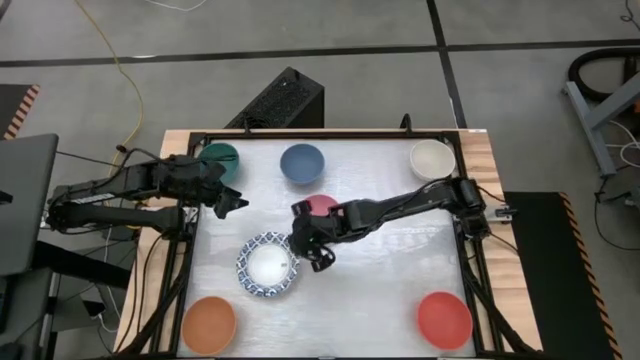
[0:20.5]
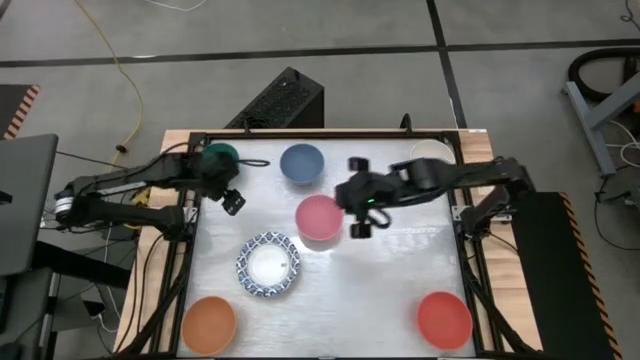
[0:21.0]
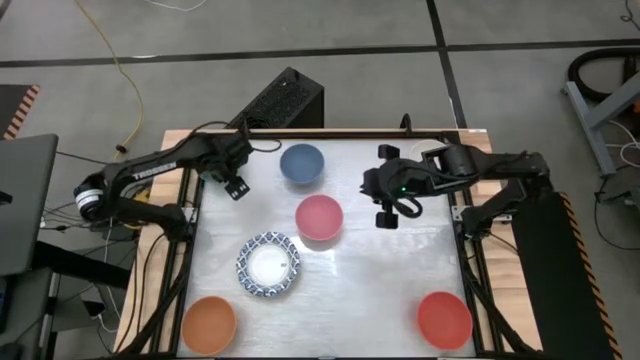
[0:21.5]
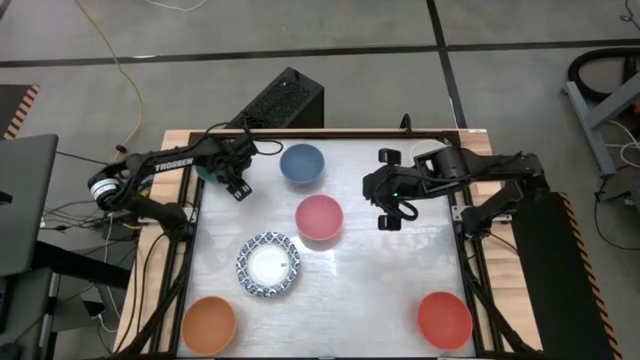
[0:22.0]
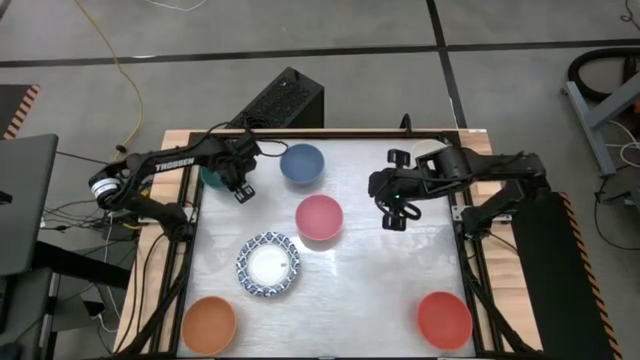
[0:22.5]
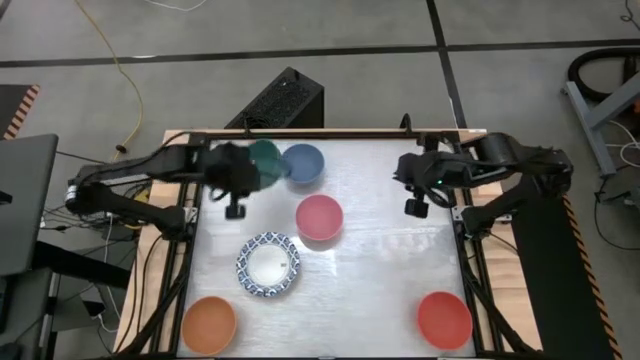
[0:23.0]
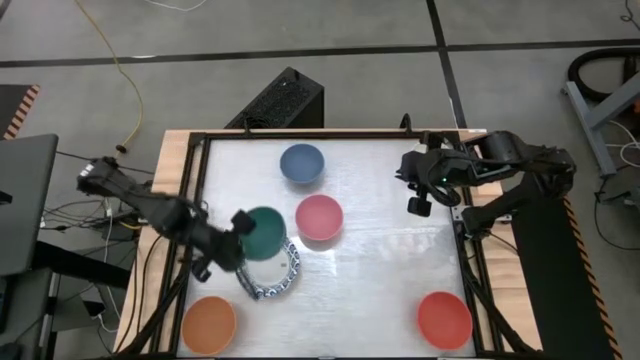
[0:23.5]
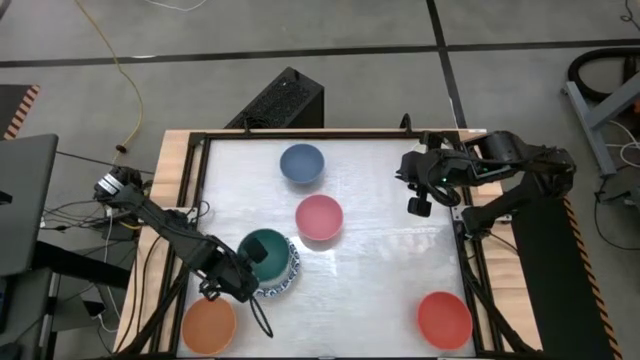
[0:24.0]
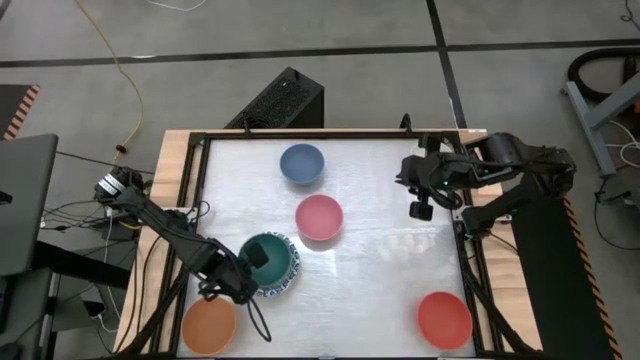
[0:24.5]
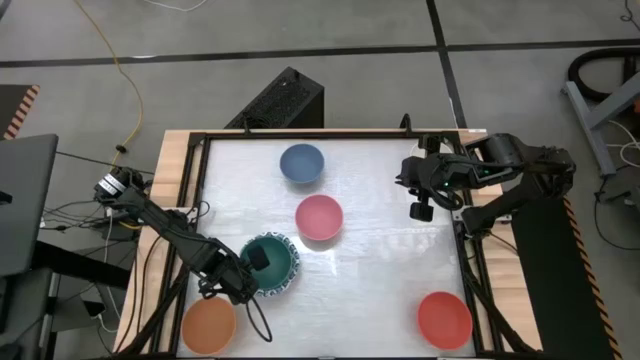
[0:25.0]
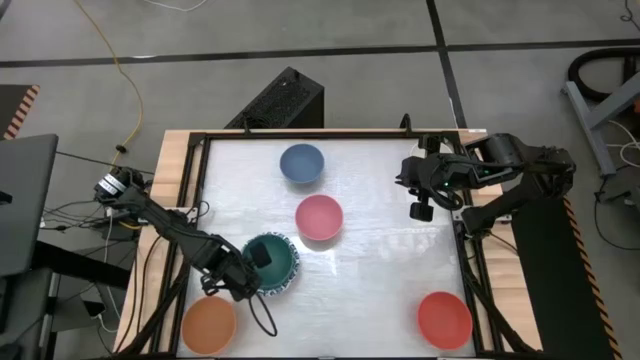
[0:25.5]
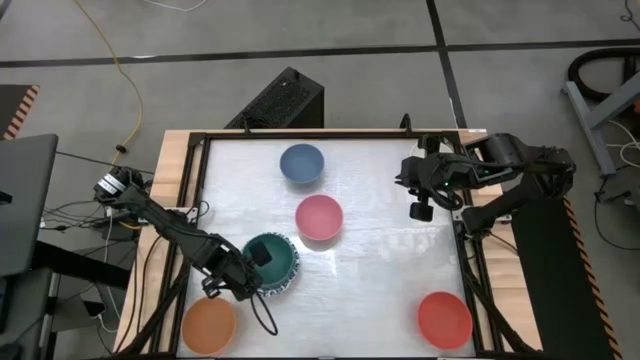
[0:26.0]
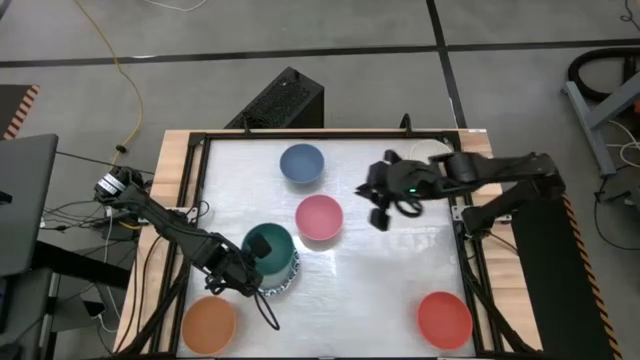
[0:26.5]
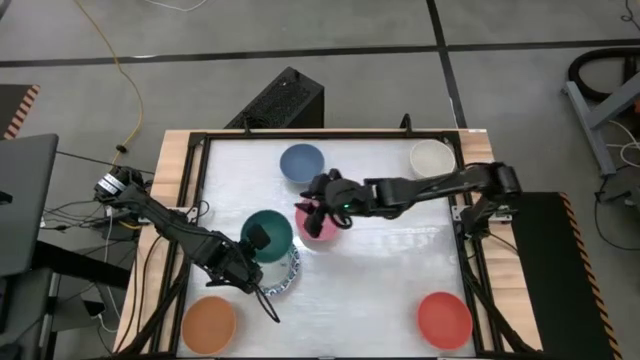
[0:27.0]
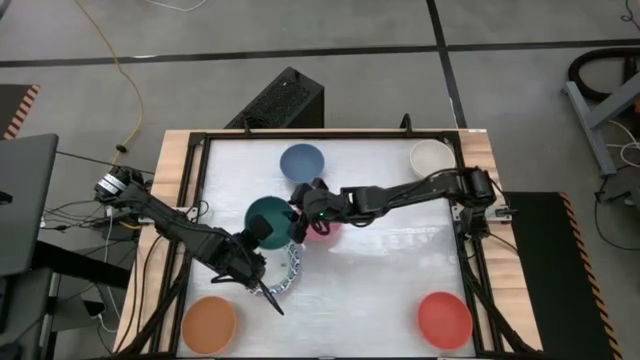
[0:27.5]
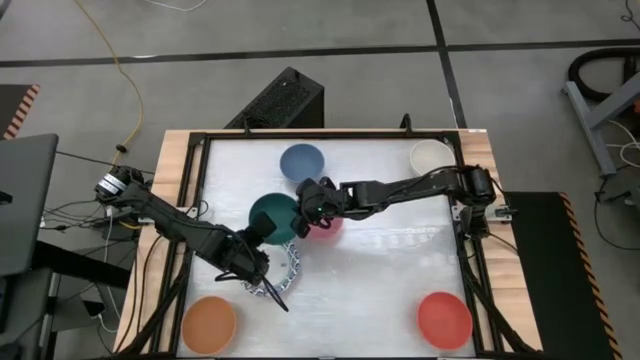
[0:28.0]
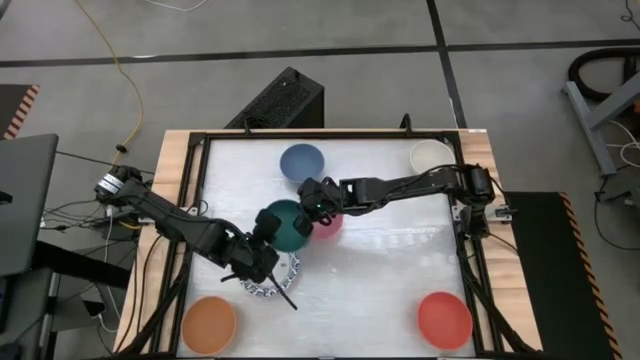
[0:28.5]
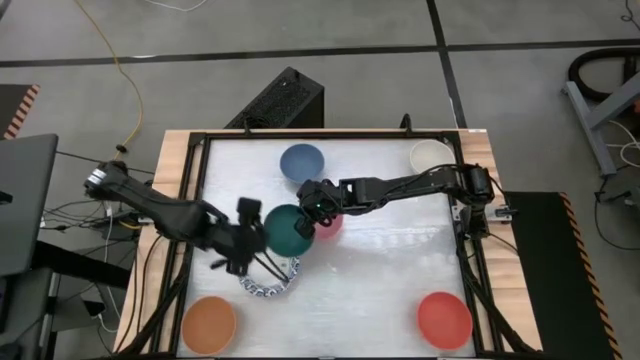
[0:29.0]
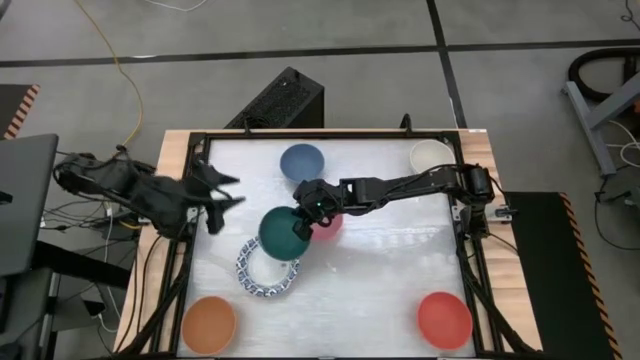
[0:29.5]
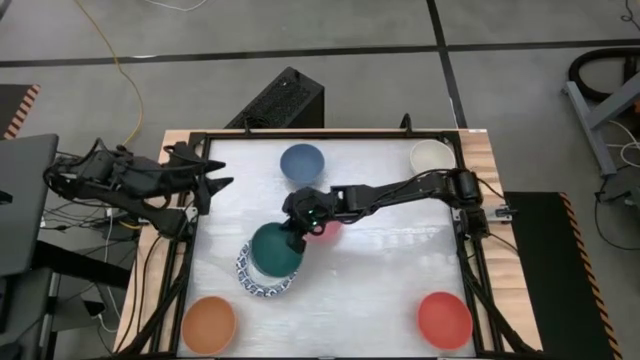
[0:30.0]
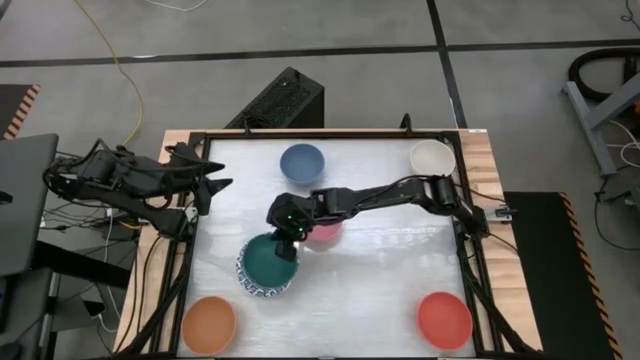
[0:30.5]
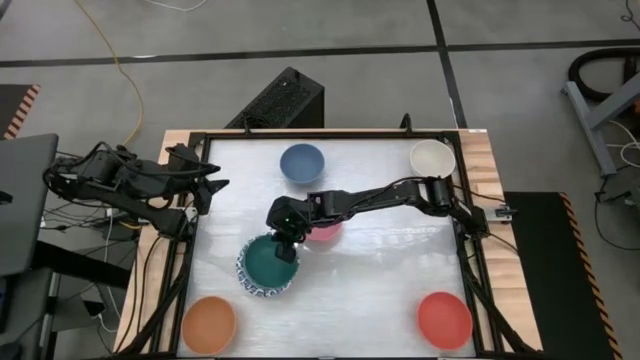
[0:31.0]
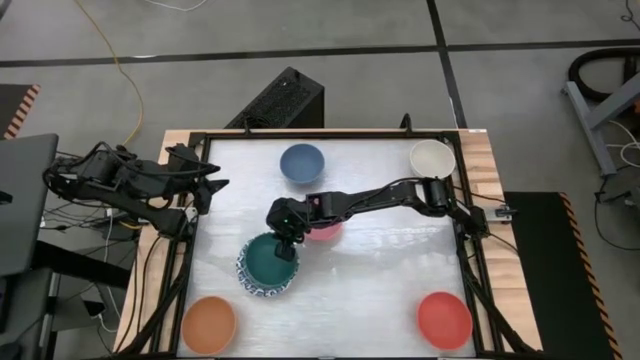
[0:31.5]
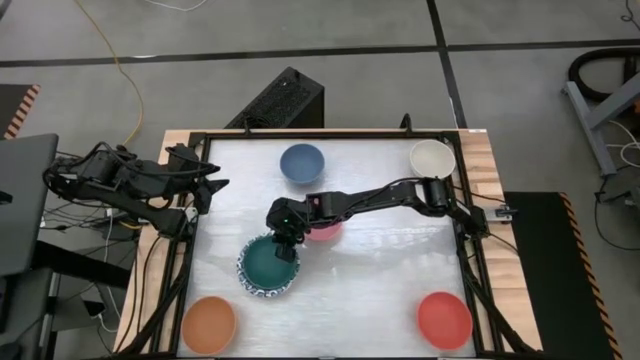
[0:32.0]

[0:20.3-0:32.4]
Stack the green bowl on top of the patterned white paper bowl

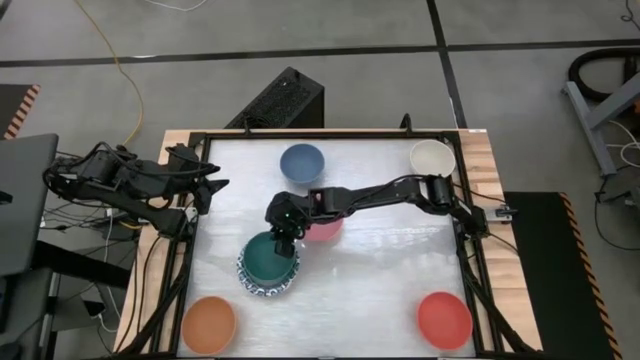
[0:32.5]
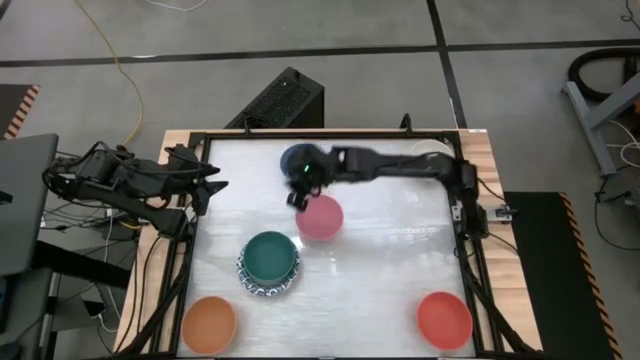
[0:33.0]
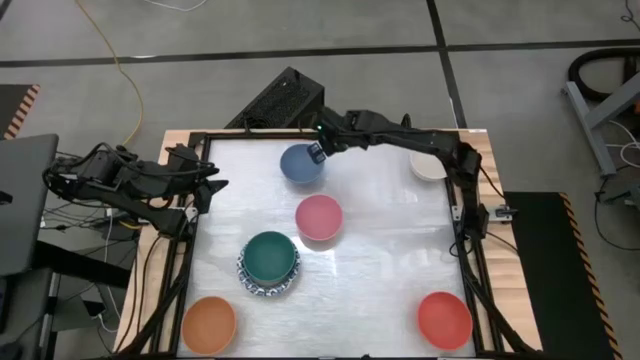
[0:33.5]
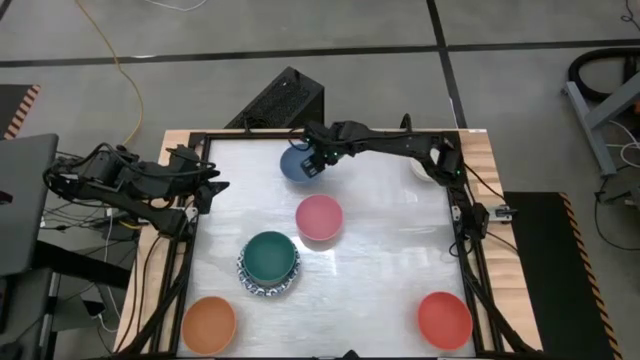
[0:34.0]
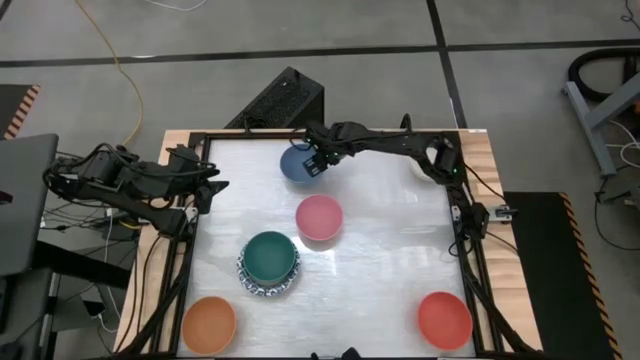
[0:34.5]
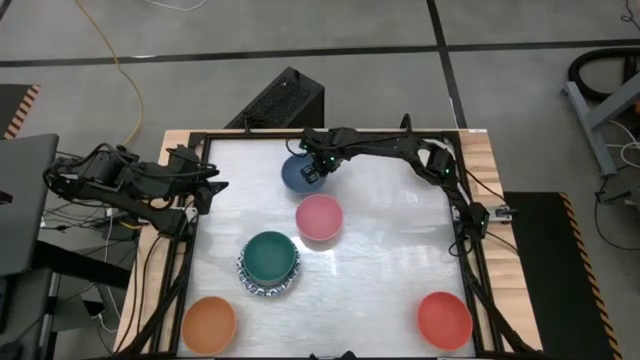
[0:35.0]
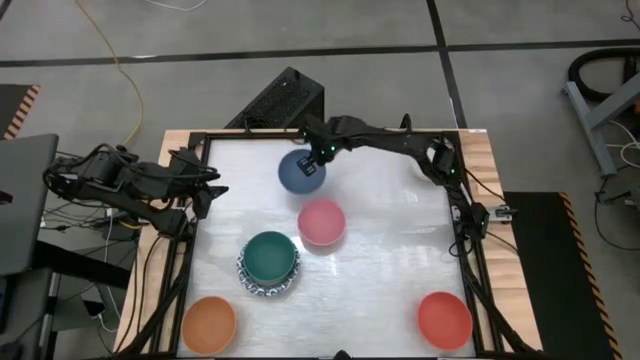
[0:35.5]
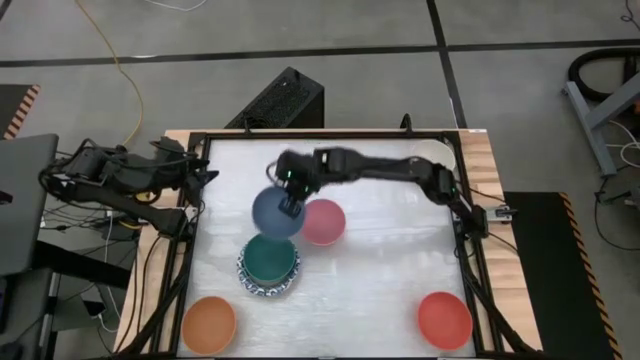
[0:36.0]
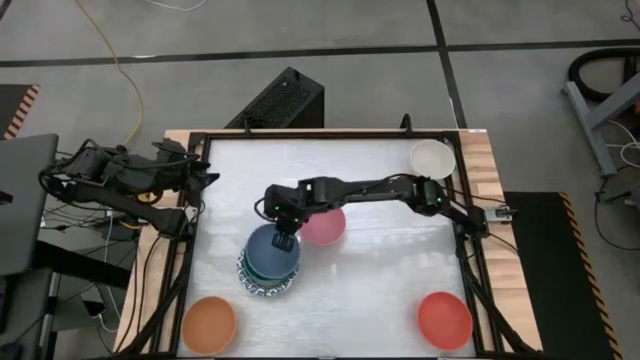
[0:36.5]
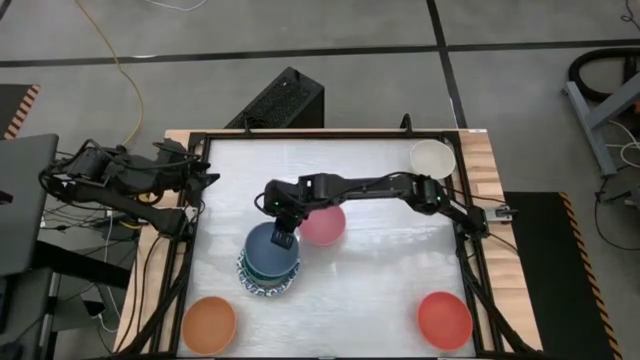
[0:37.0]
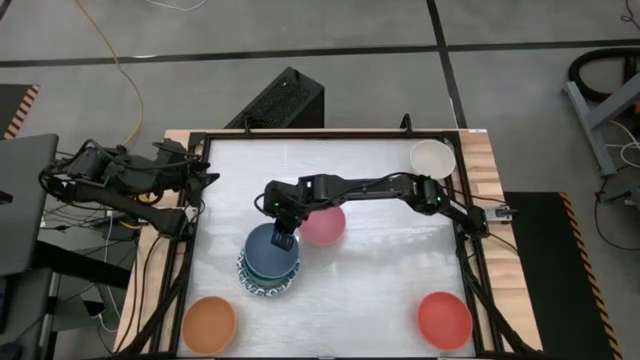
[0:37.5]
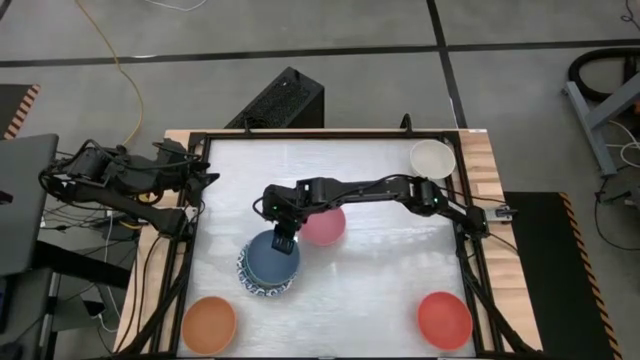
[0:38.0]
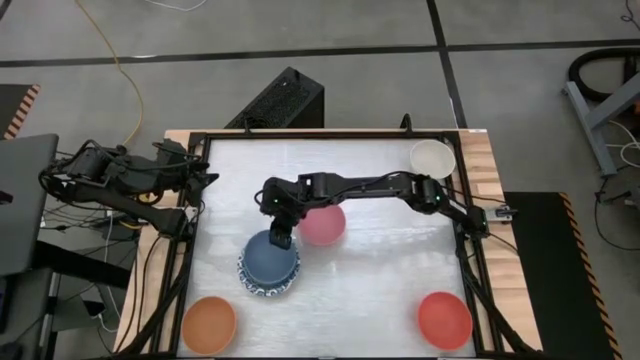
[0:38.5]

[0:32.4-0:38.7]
Stack the blue bowl on top of the green bowl
